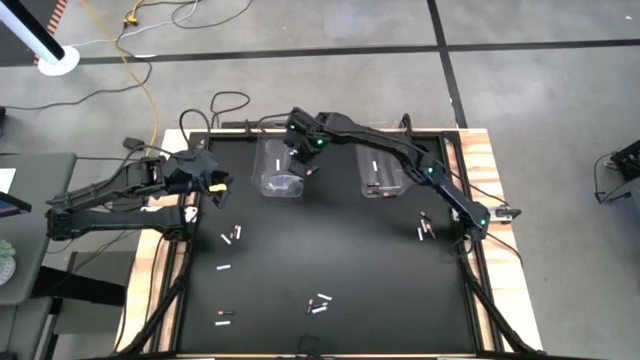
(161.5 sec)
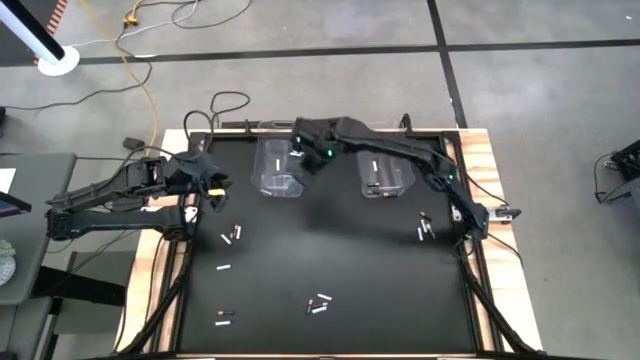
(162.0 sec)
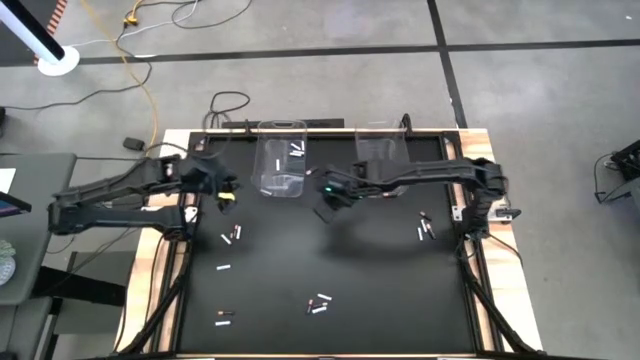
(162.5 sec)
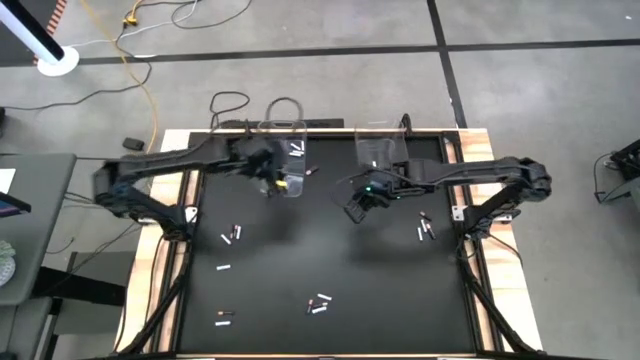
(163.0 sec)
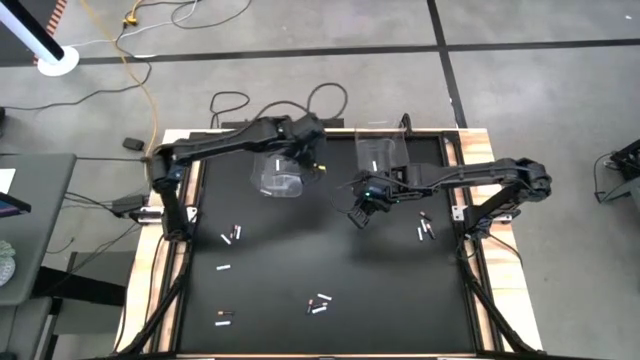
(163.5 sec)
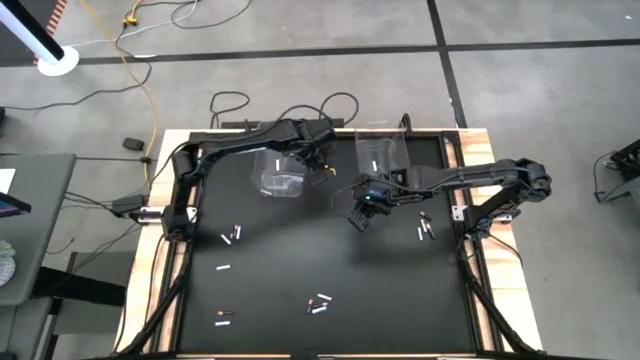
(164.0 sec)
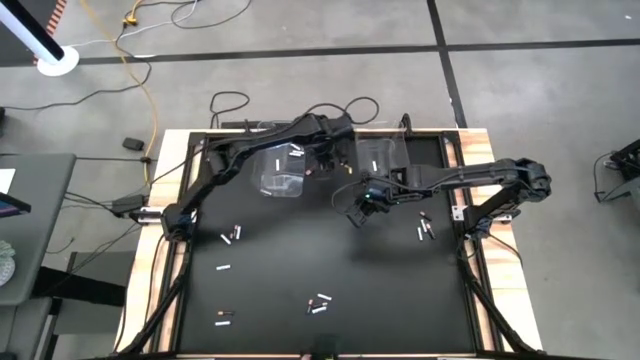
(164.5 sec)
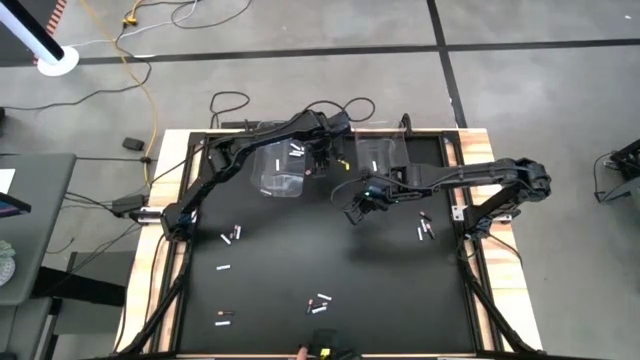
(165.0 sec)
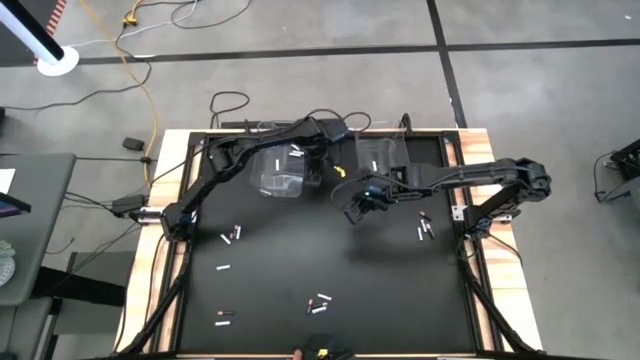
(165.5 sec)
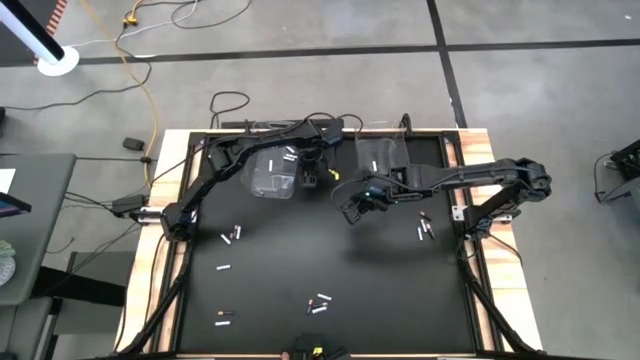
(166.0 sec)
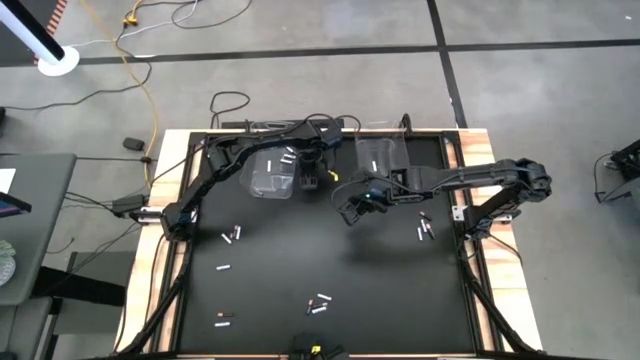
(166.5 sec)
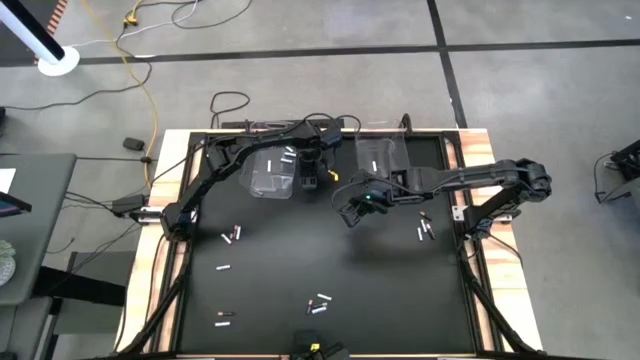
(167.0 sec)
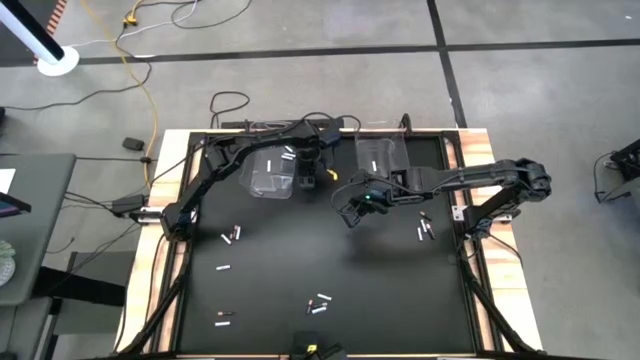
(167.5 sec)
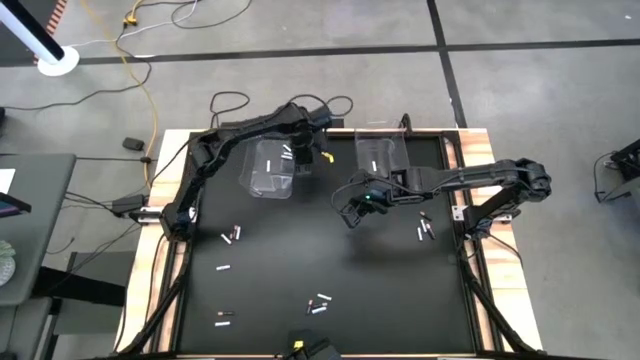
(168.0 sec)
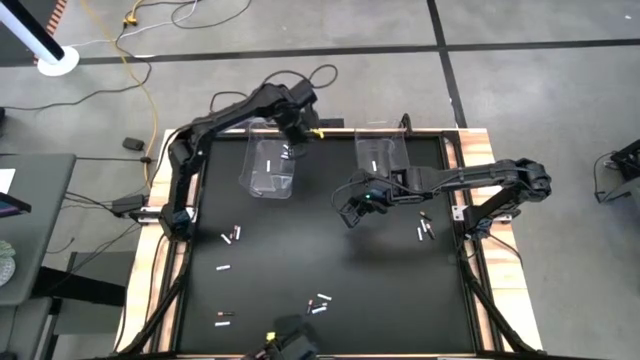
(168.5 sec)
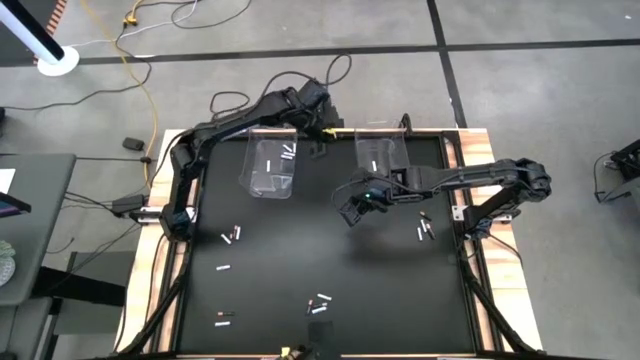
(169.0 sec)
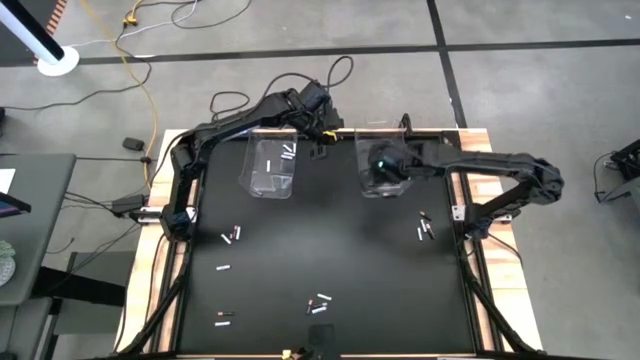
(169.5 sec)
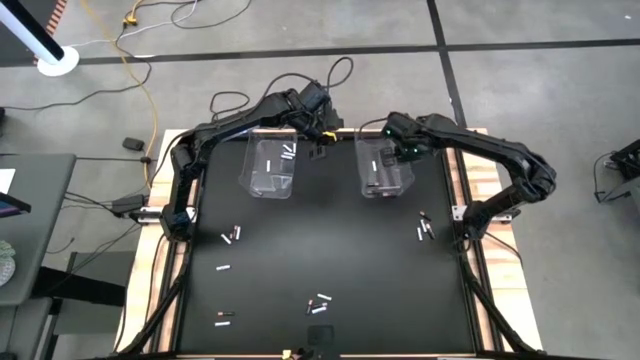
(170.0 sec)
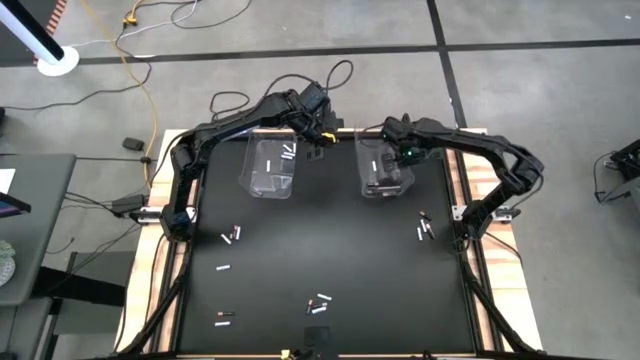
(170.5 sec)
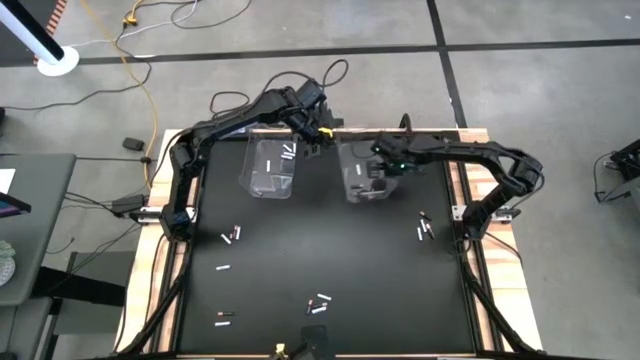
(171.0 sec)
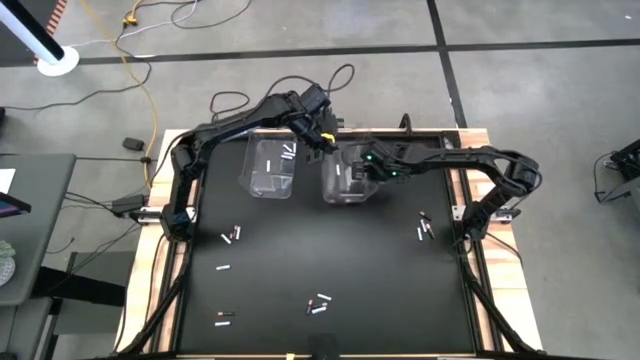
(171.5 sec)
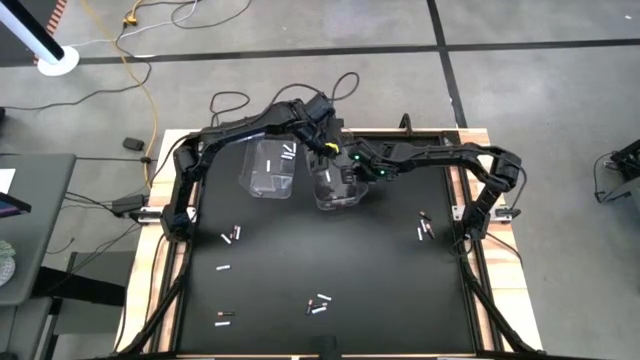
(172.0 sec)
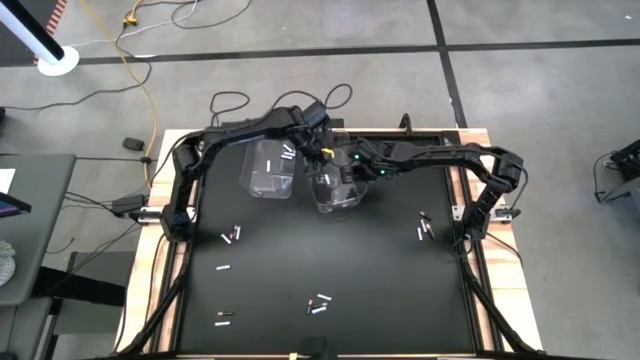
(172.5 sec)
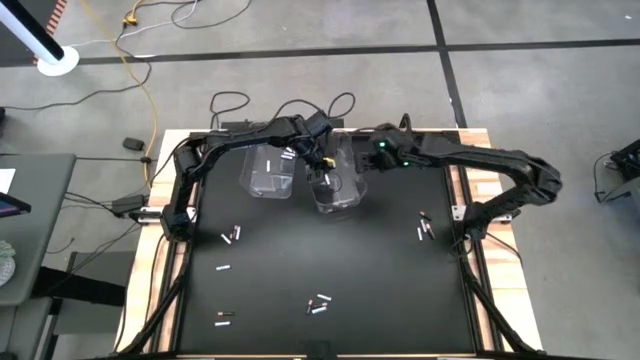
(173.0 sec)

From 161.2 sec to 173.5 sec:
Task: Sort batteries
Put the black battery into the right transparent bin

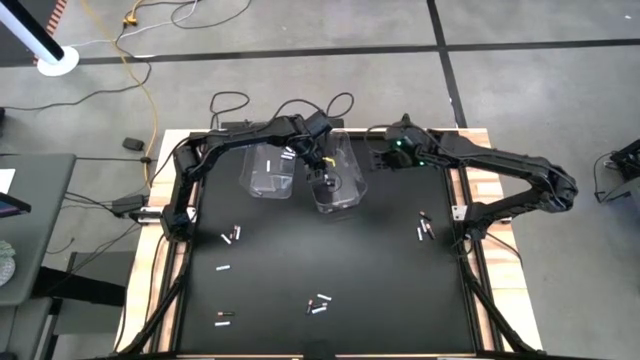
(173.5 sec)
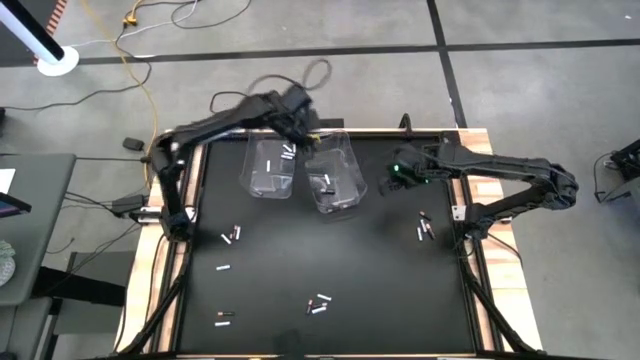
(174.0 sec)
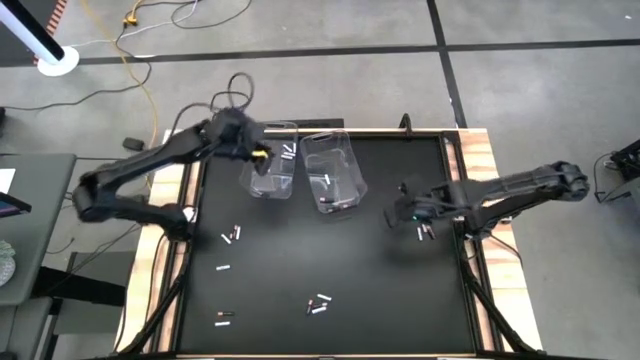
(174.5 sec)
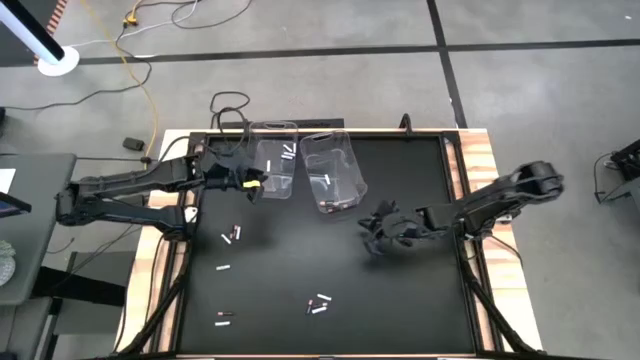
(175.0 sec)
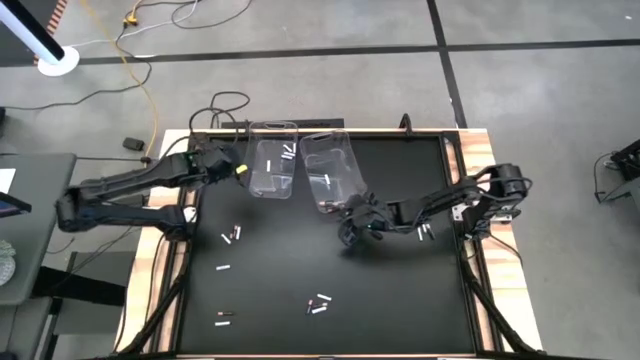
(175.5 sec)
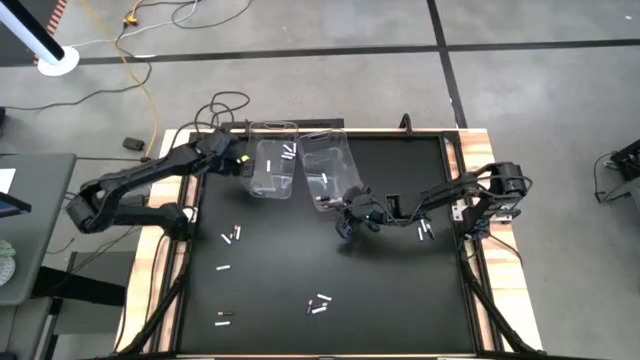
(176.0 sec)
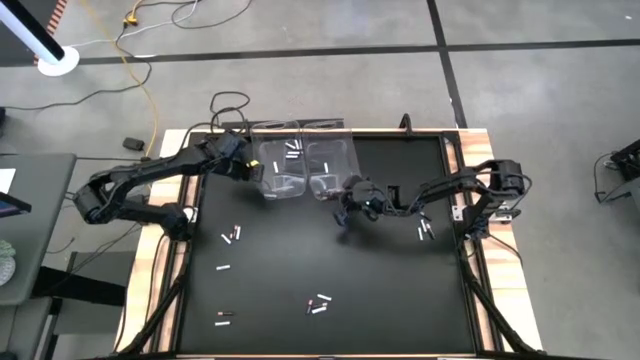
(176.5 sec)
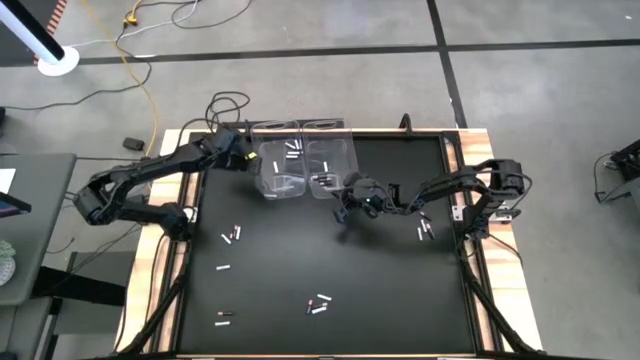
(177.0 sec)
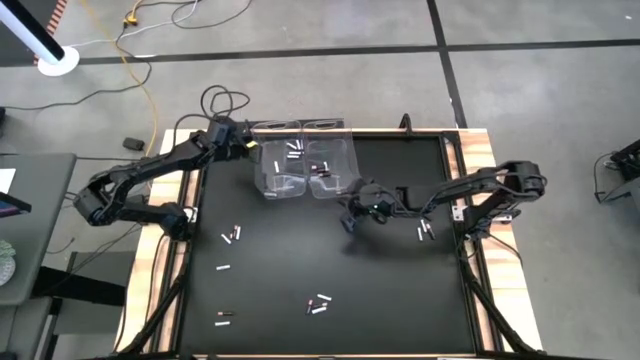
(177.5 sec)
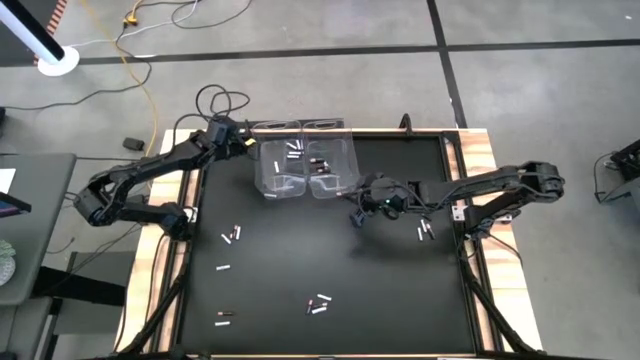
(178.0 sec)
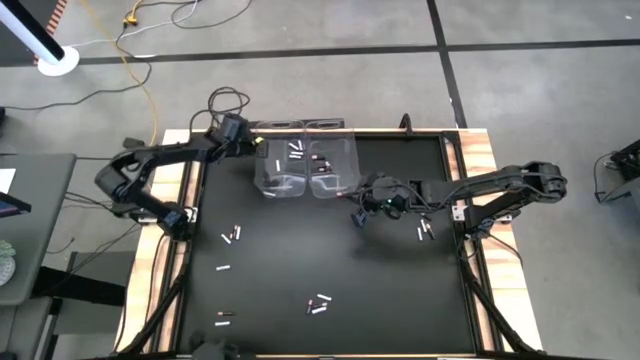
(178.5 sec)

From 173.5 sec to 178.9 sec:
Adjust the transparent bins

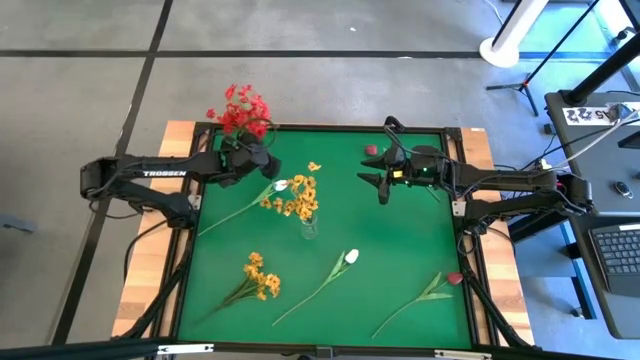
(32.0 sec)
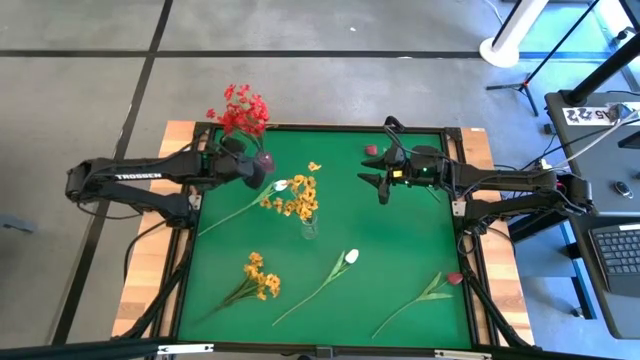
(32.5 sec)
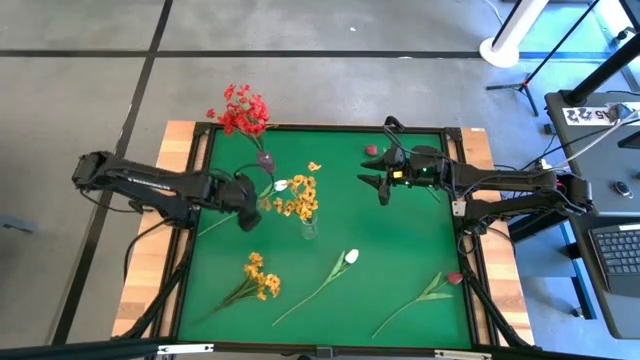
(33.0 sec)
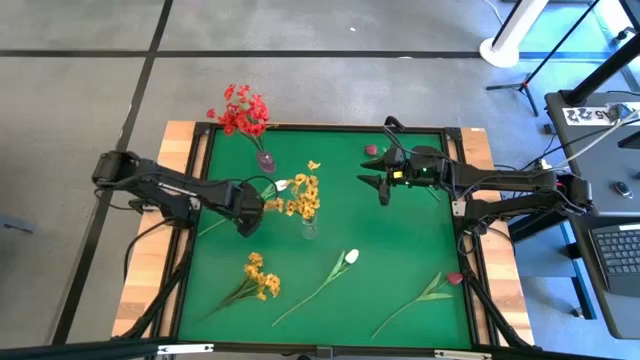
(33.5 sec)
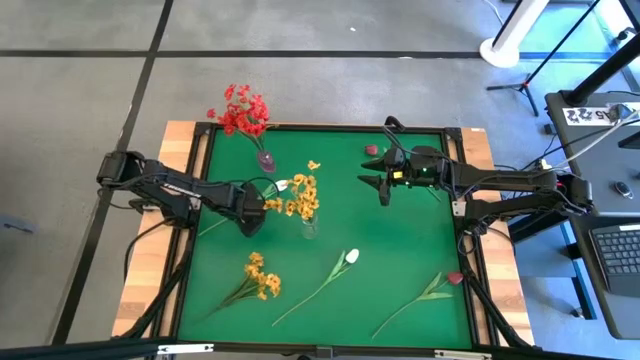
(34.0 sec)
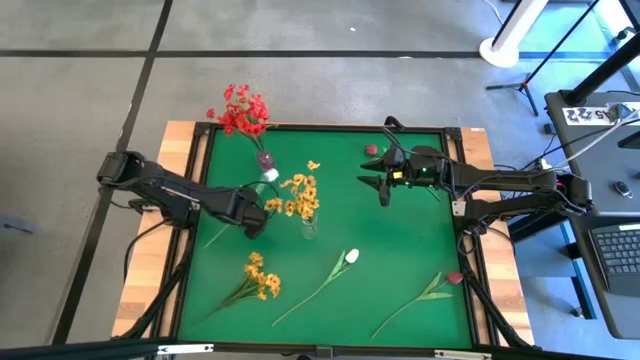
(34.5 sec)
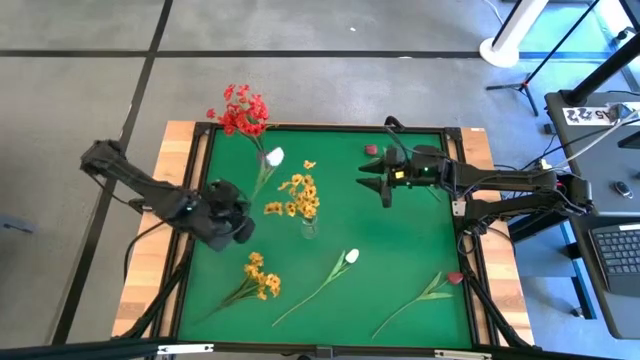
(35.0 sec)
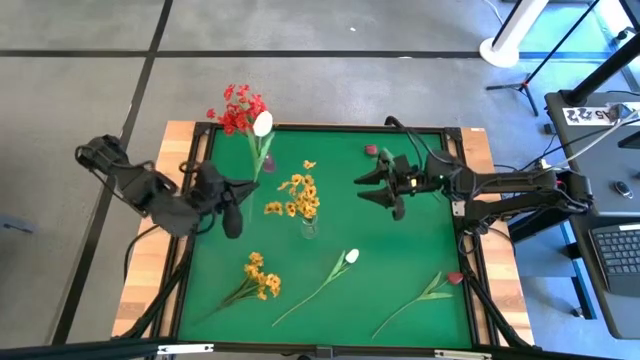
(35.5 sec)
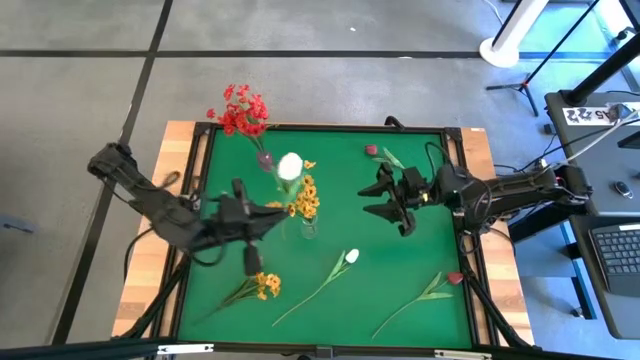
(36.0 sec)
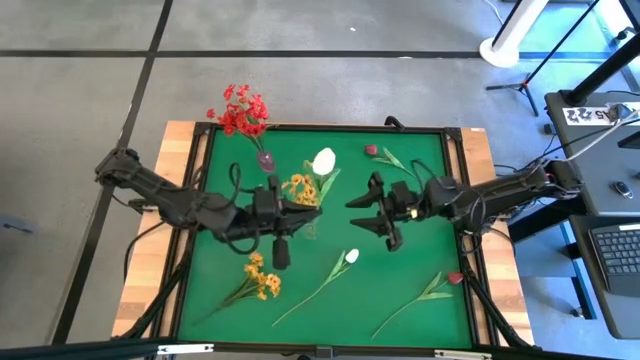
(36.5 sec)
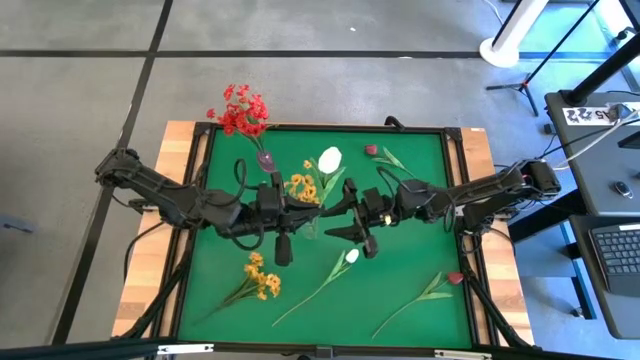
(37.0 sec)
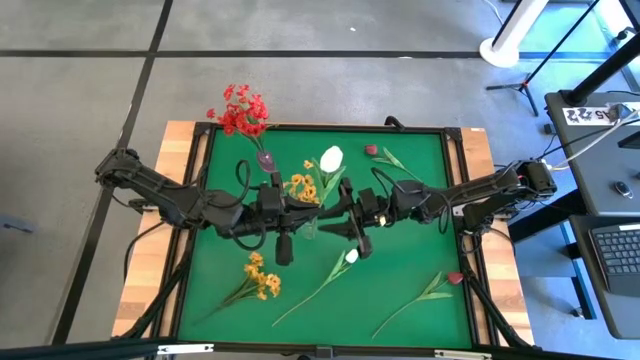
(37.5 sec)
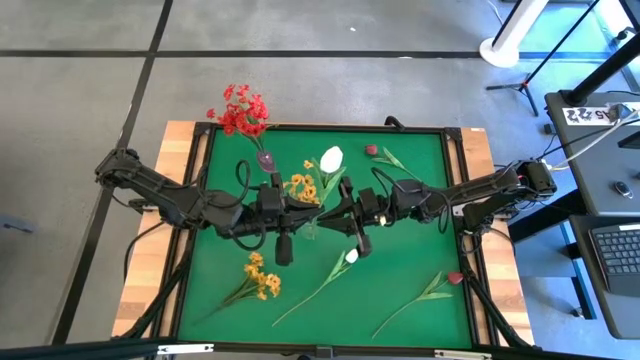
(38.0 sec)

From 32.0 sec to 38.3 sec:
Task: Sort flowers into vase by color
Put the top white tulip into the transparent vase
